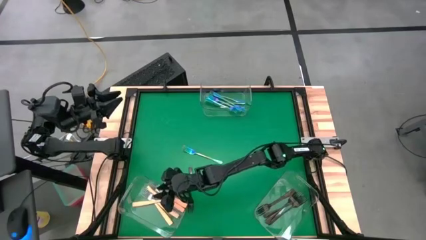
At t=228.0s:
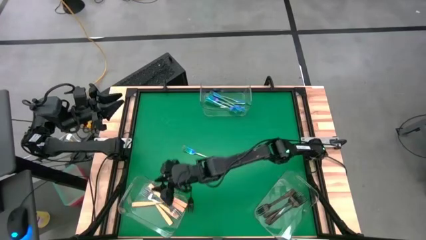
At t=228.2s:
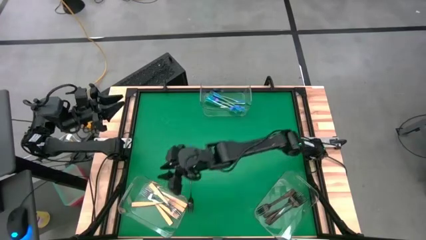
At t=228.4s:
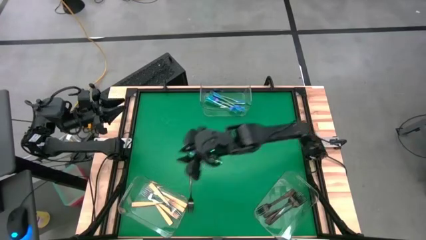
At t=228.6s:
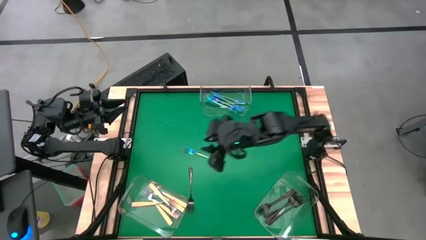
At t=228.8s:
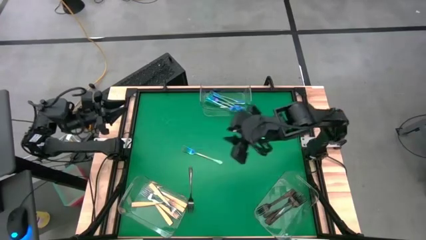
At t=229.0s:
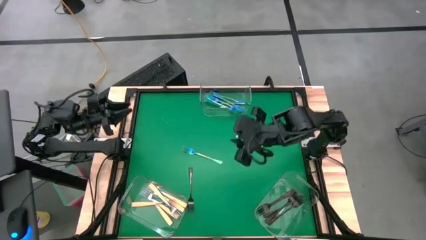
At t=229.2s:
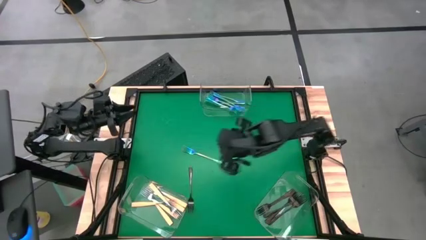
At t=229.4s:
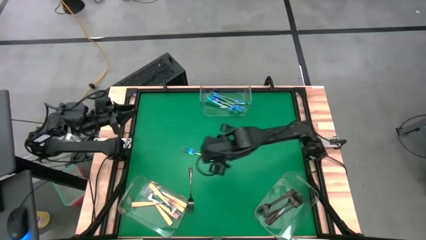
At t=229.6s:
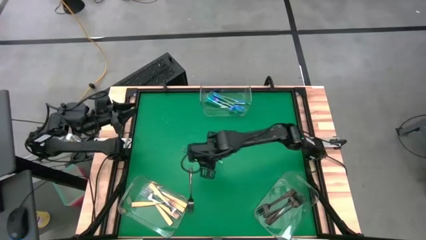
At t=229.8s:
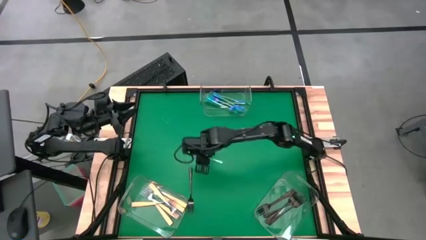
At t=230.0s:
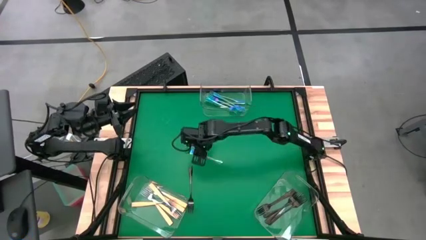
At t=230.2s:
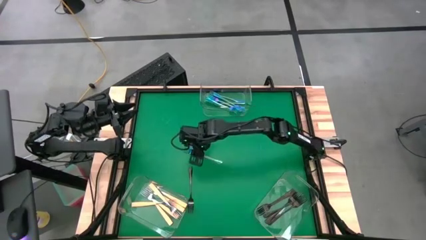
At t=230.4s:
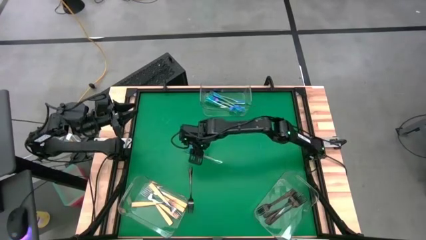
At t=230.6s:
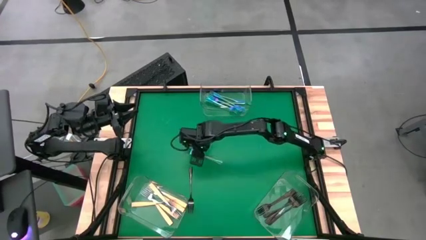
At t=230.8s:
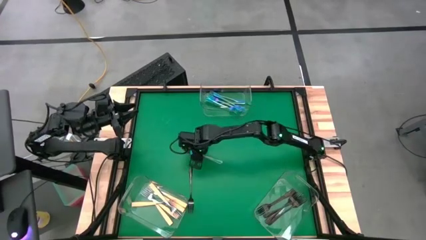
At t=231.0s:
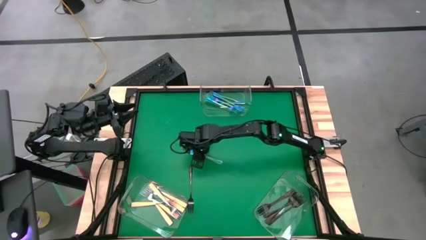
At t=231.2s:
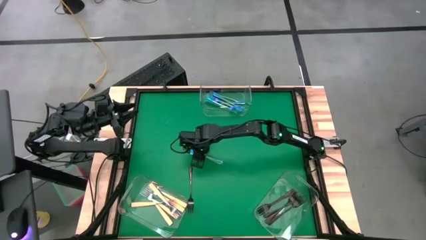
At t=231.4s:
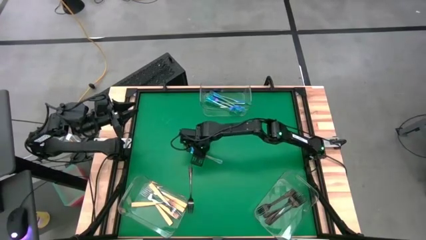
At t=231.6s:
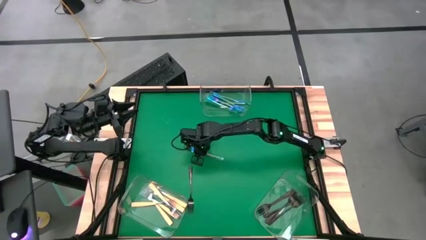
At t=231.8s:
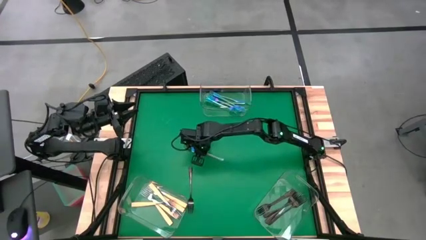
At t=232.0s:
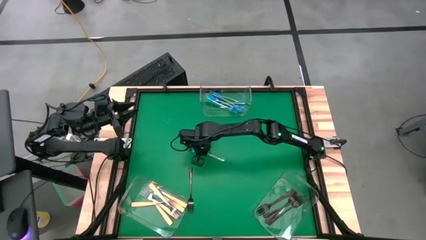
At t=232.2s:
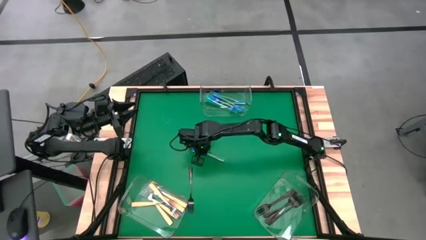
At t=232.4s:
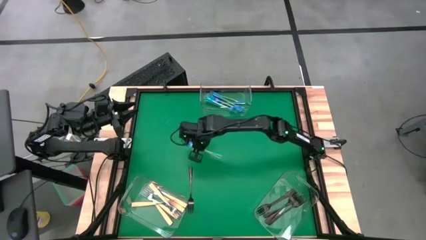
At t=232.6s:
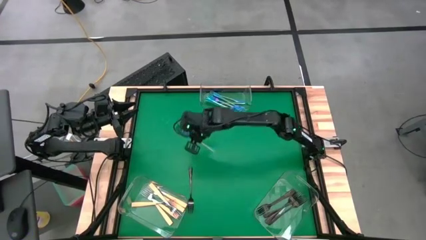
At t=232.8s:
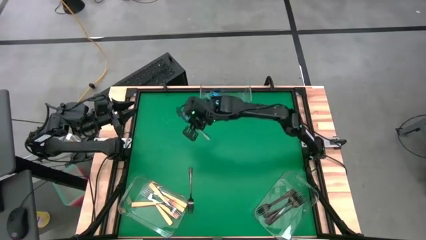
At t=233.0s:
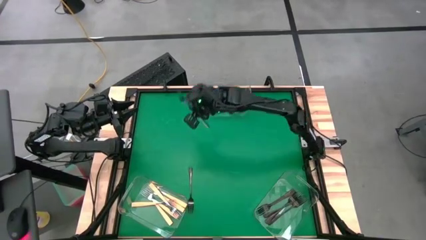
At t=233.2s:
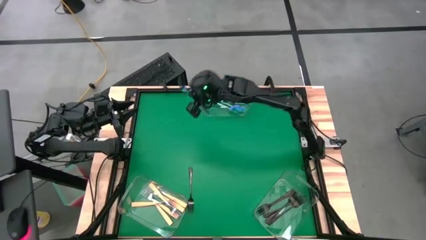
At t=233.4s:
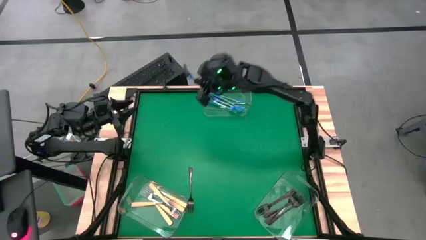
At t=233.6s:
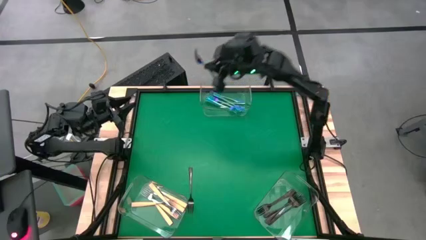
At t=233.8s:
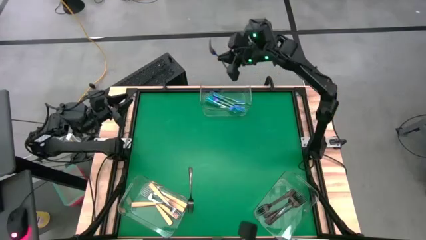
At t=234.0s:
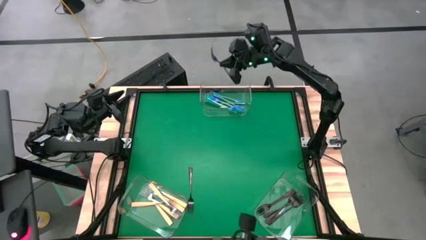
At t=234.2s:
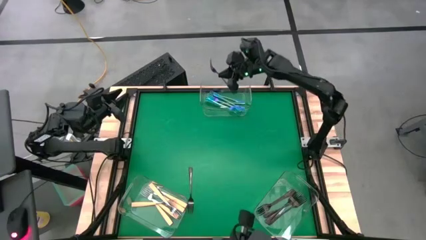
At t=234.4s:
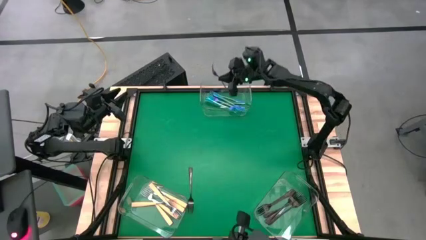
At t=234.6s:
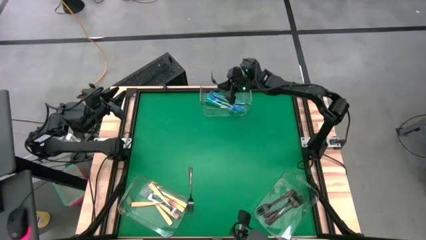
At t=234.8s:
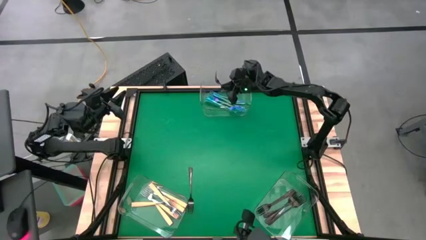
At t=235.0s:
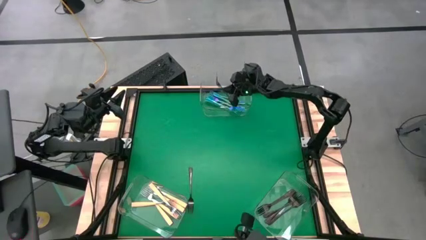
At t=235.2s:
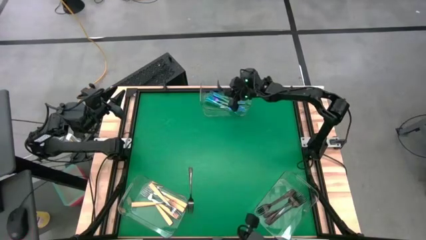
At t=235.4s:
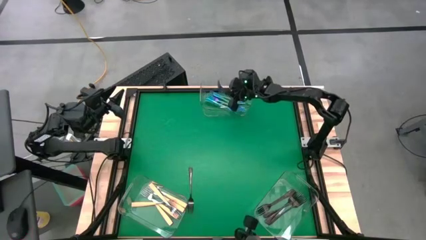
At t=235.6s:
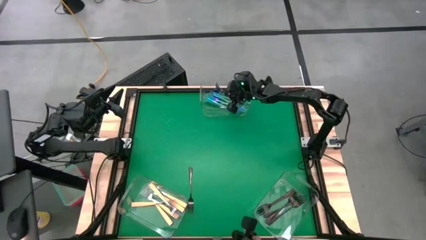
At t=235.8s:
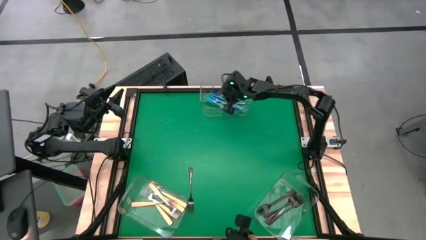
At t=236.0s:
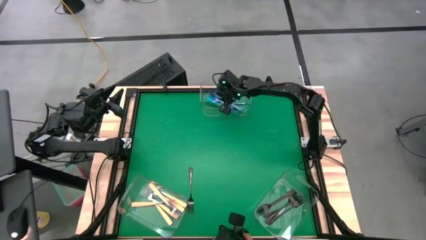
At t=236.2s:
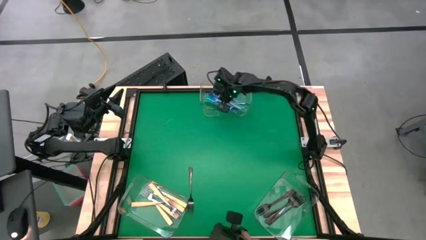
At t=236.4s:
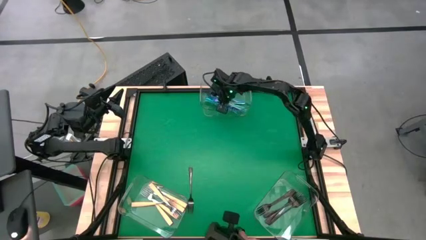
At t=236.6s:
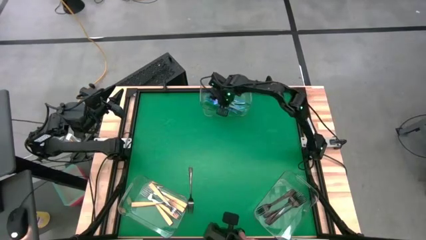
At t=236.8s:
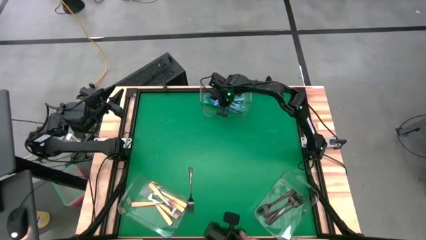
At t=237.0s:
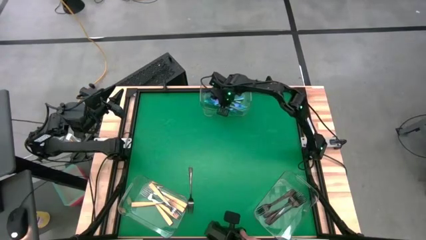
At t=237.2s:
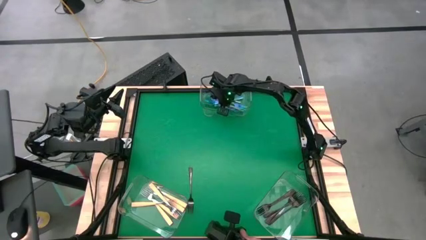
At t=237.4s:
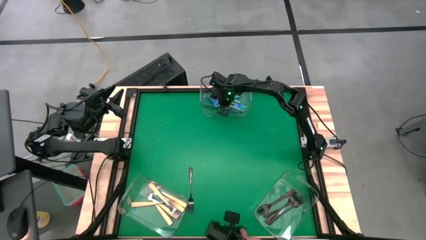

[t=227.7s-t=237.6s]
Task: Sort silverware by color (type)
Put the blue fork into the top transparent bin

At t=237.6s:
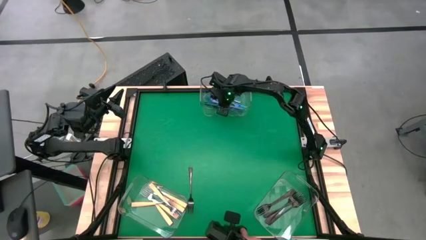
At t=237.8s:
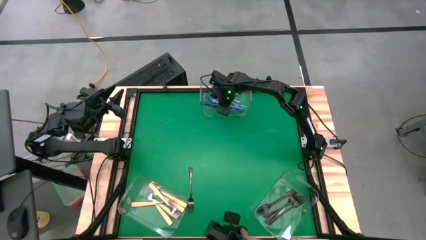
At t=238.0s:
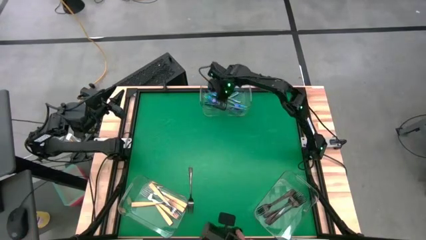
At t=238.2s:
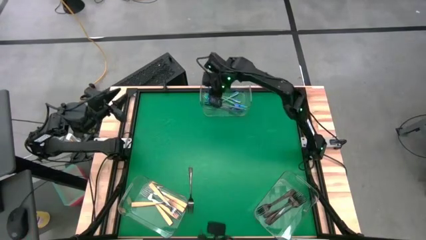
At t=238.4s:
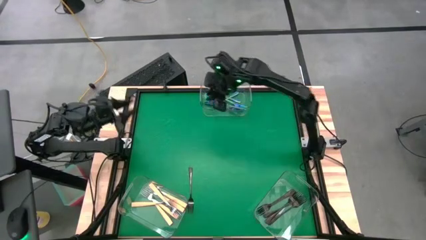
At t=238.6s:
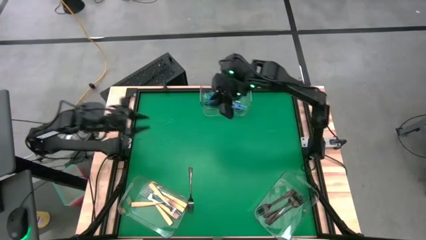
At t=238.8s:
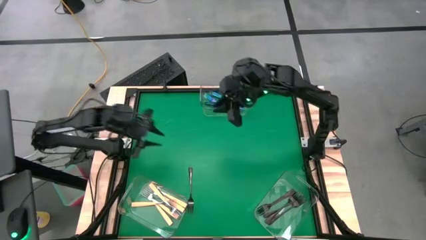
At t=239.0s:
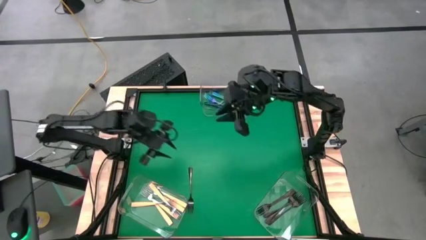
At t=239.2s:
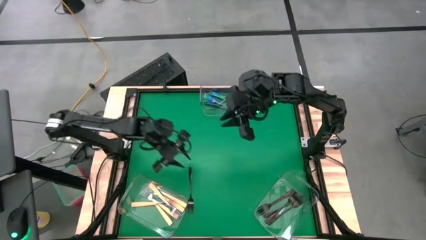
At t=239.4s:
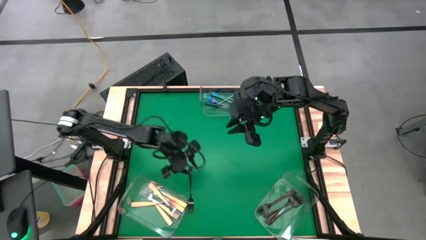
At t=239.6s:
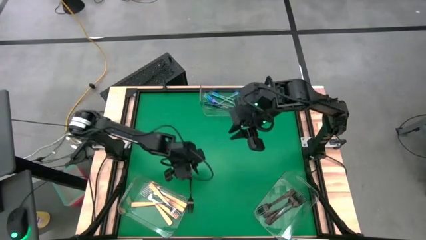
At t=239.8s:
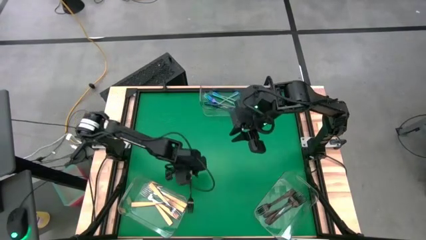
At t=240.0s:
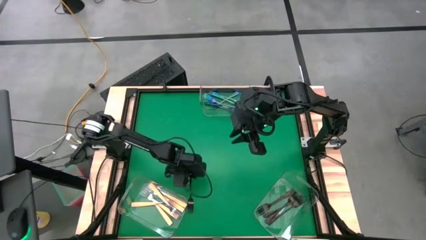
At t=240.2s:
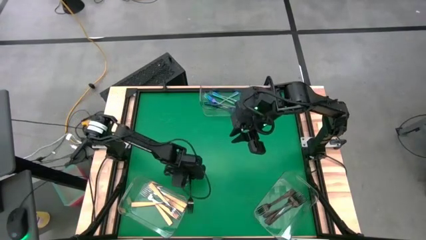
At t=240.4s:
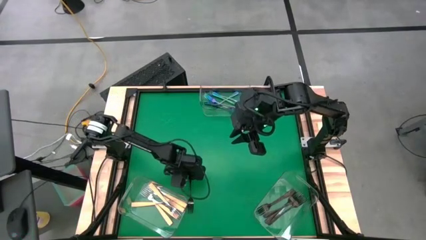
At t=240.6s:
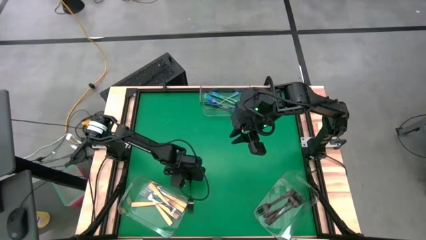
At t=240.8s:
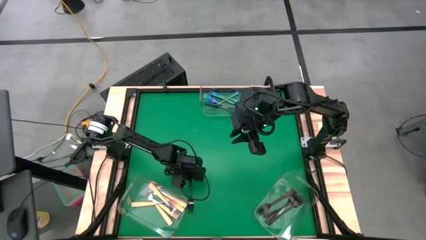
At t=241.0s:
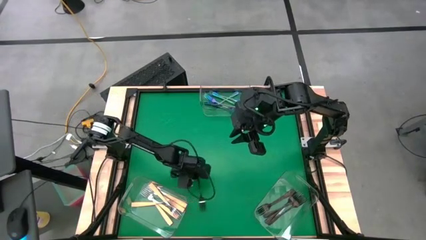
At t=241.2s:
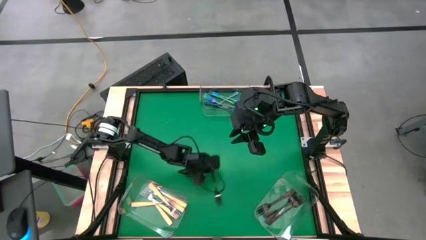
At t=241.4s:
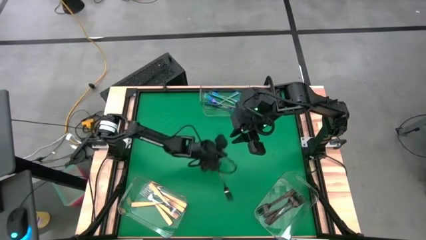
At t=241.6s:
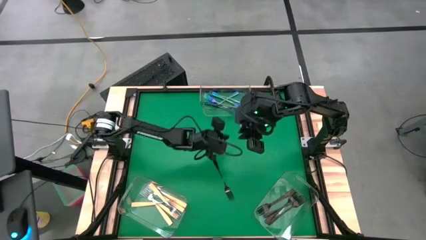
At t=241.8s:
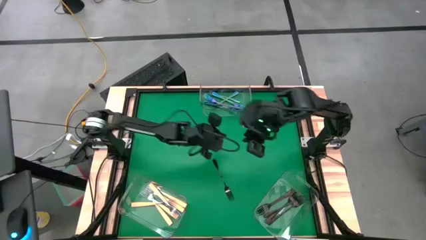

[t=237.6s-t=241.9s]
Put the black fork into the bottom right transparent bin

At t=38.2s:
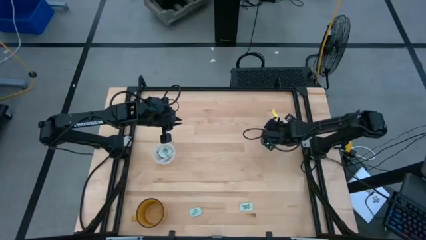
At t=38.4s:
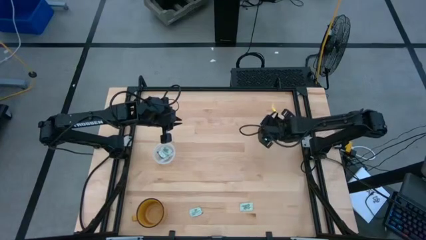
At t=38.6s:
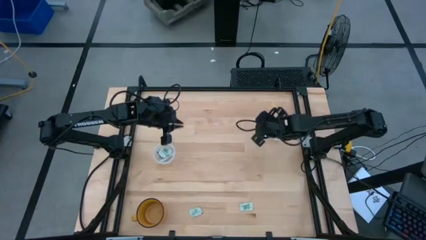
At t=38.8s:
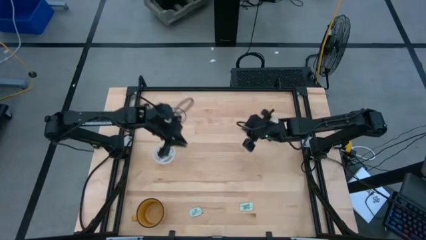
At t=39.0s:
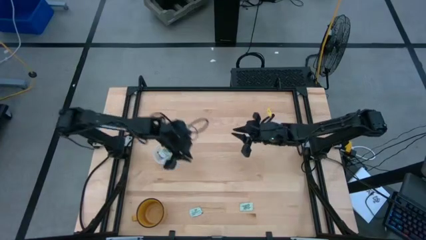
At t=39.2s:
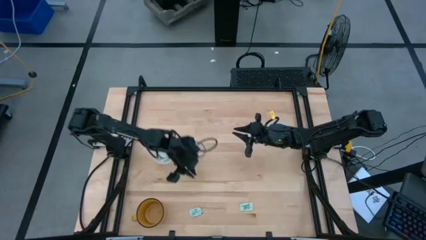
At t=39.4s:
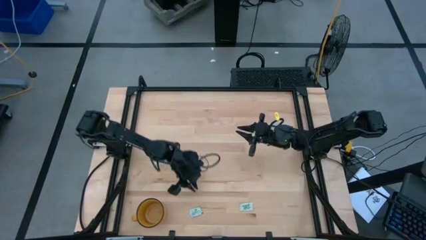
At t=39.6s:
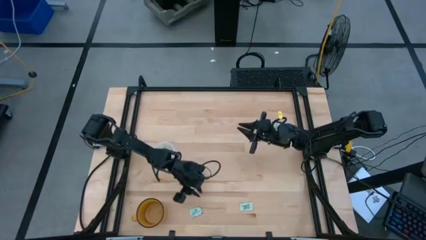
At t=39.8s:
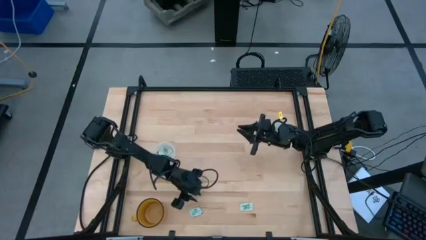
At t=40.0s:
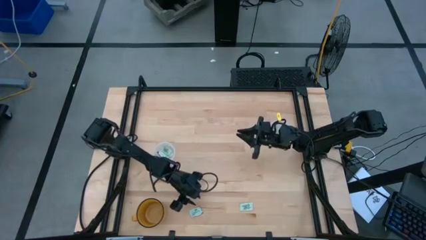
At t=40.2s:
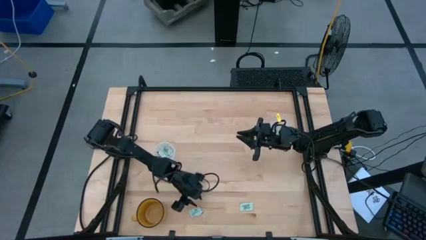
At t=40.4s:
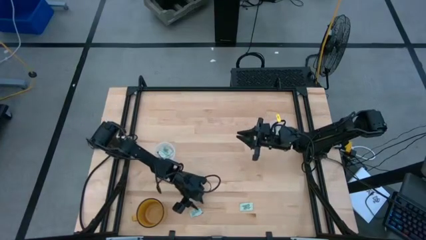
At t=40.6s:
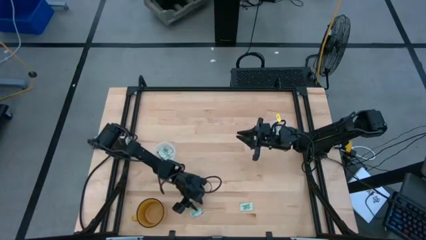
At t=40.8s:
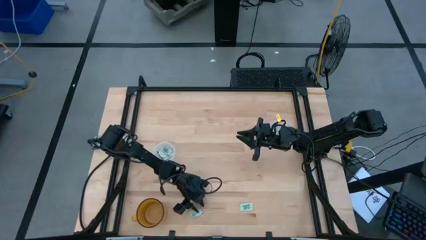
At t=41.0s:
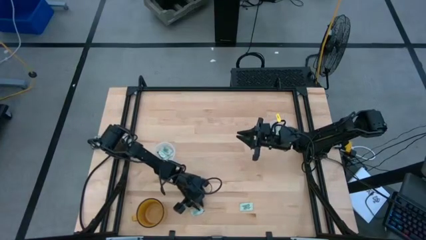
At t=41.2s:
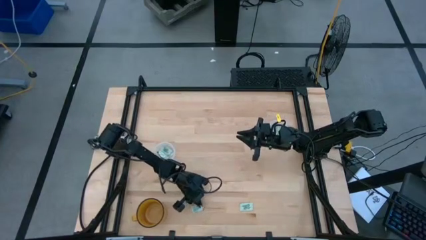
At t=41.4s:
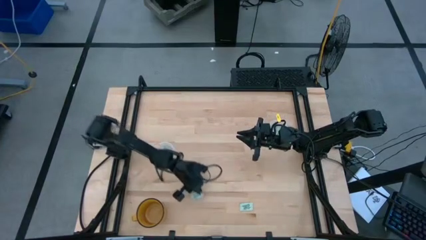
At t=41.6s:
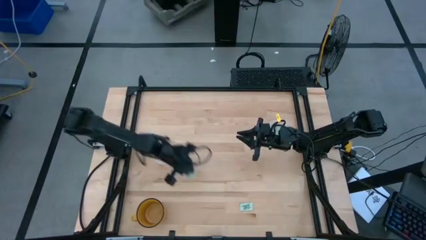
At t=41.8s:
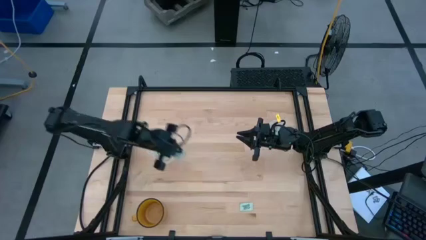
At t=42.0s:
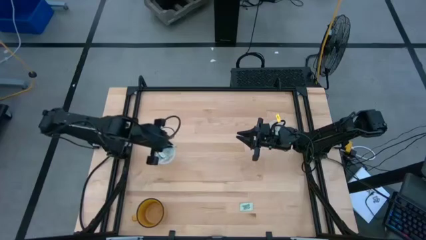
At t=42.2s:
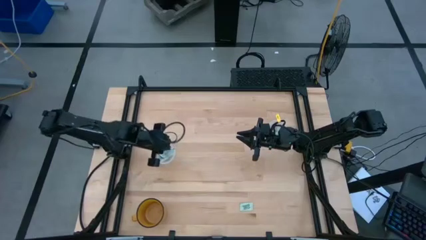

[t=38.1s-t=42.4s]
Task: Pick and place items into bin
Put the green stevia packet into the left transparent bin
